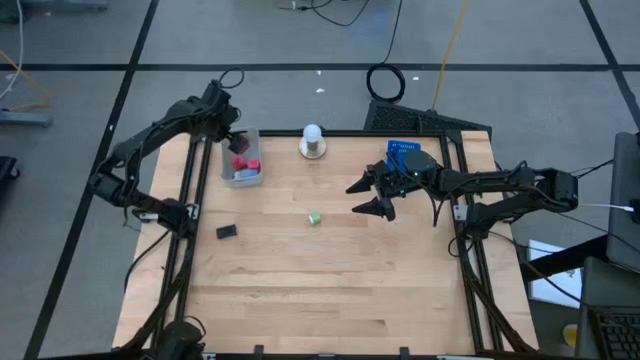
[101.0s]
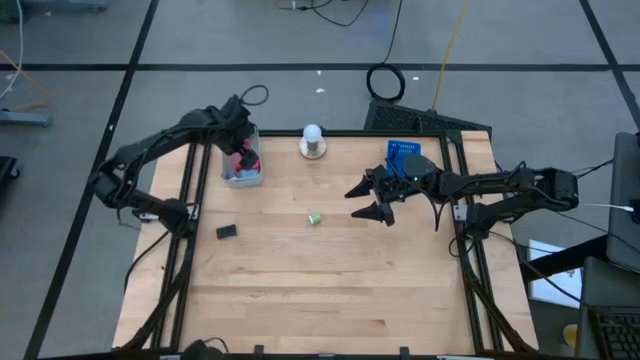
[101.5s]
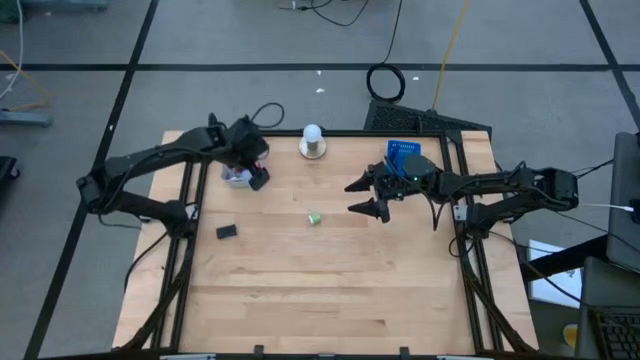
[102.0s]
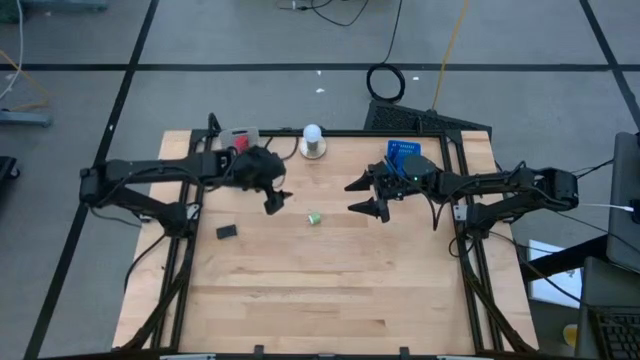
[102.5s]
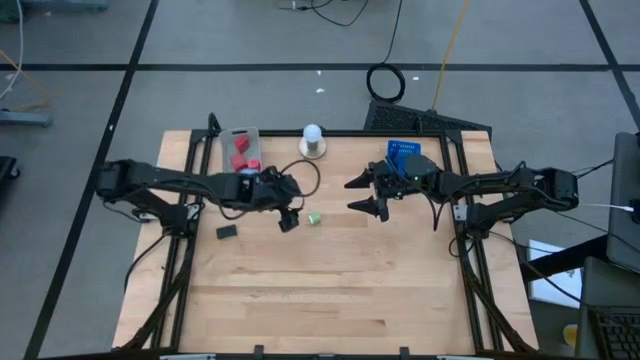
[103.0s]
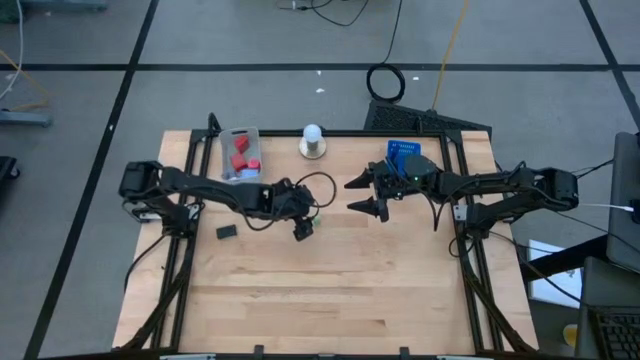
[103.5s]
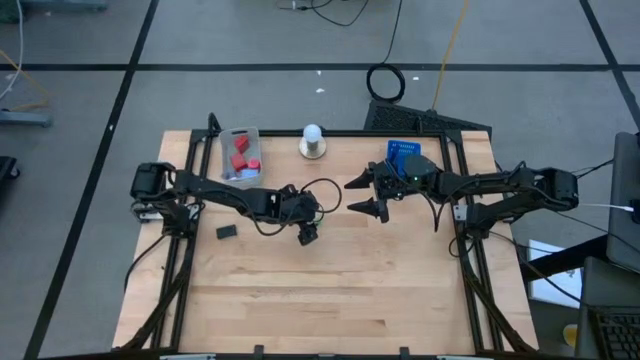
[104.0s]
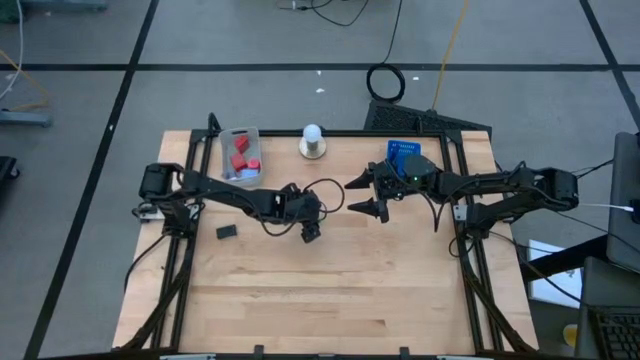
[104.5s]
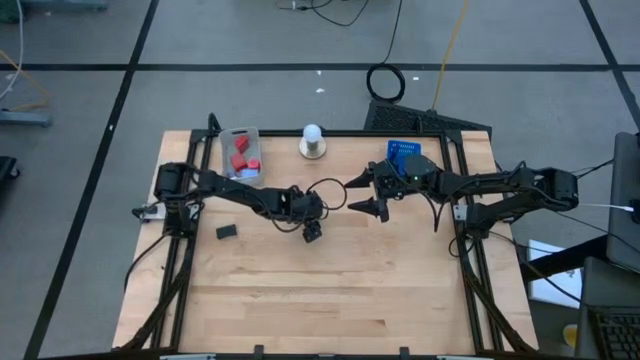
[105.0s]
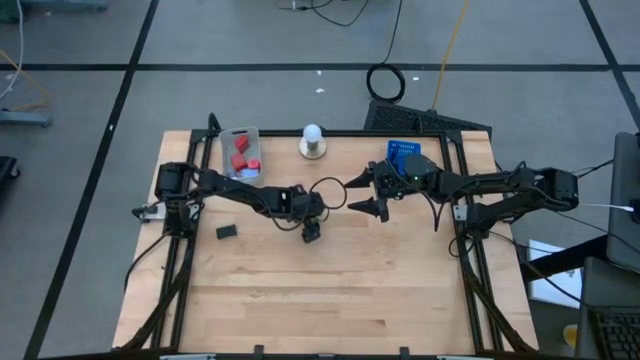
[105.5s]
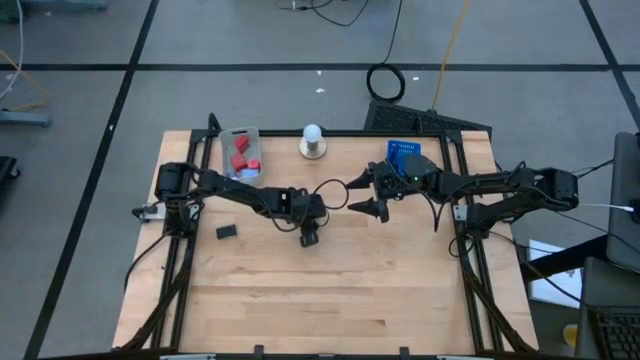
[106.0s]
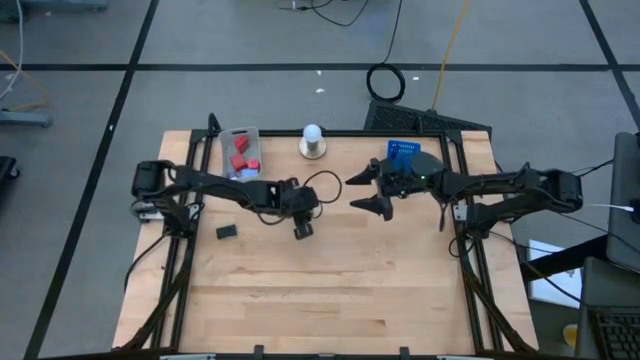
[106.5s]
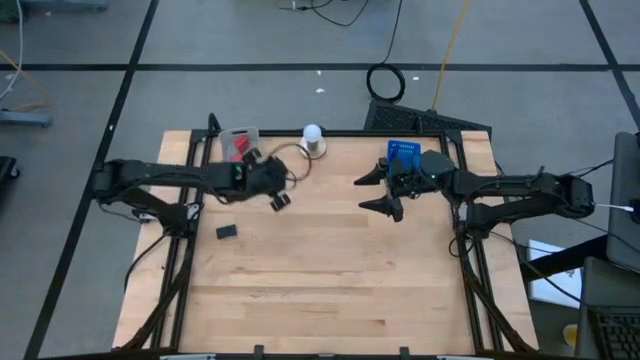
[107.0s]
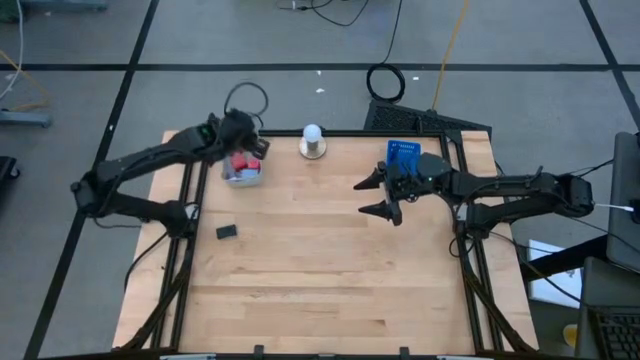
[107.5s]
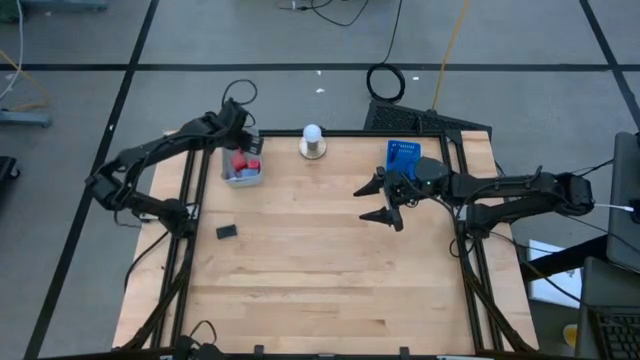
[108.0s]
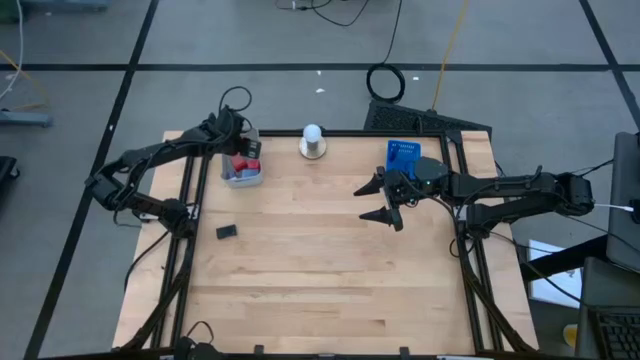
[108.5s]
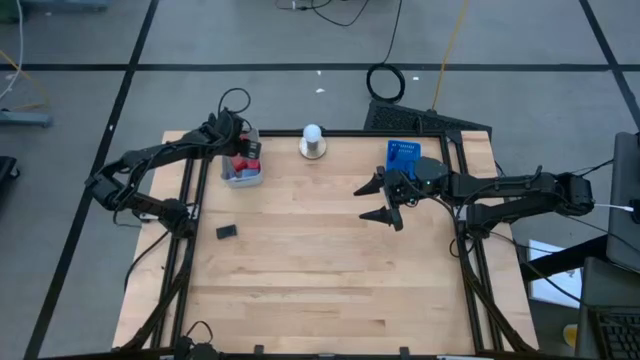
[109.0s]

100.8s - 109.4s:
Task: Pick & Place Office items
Put the green charger adapter into the gray bin

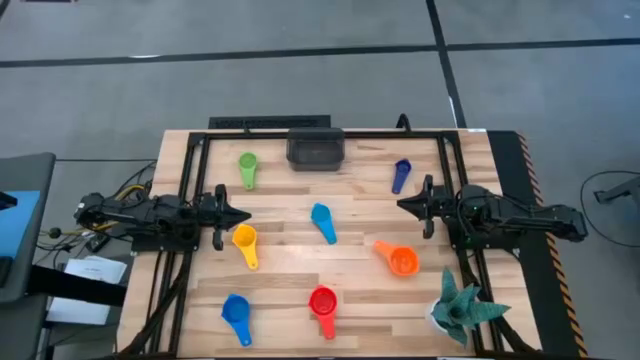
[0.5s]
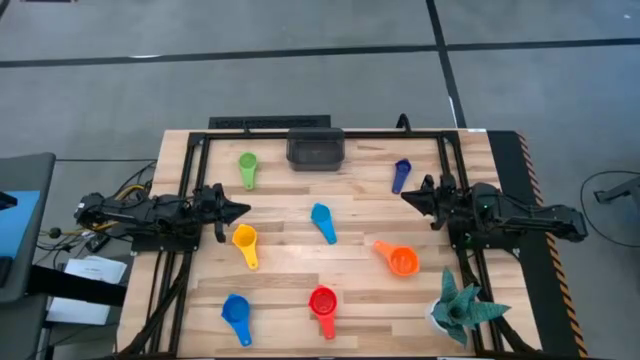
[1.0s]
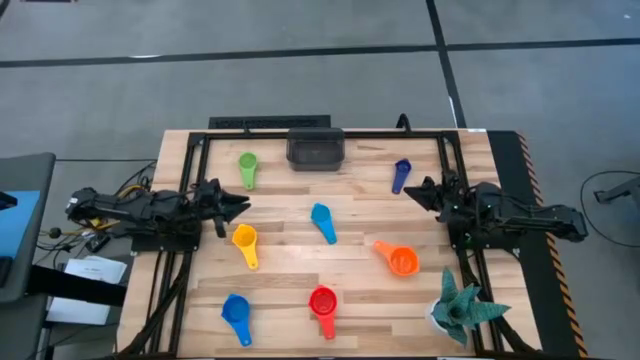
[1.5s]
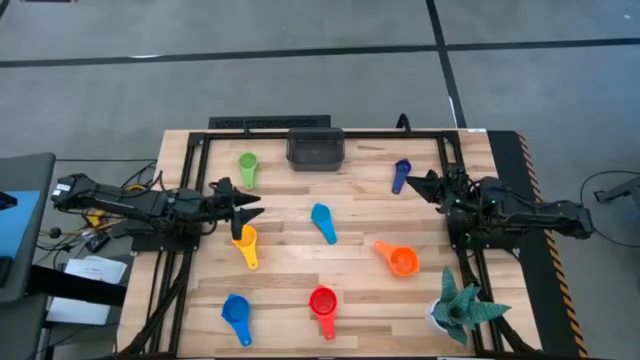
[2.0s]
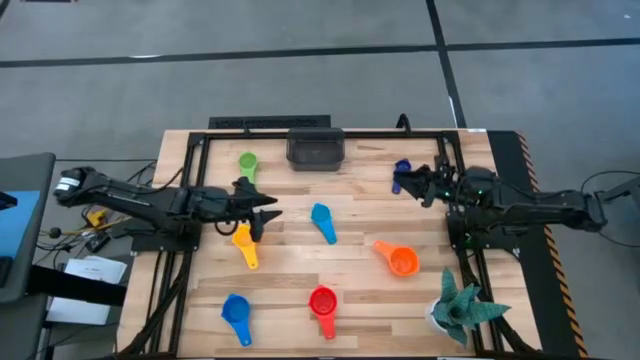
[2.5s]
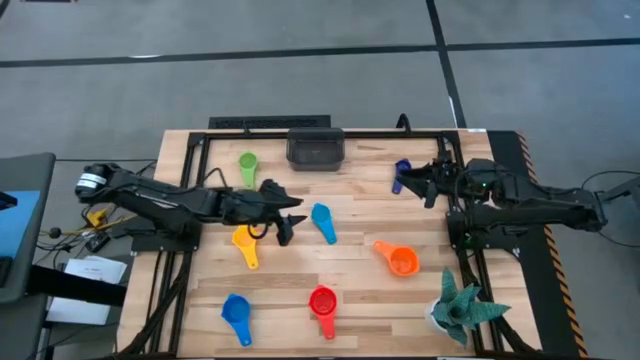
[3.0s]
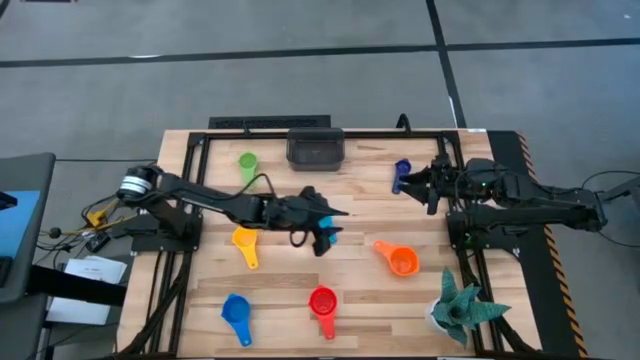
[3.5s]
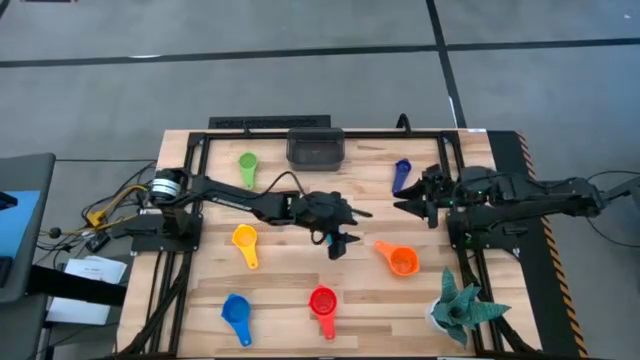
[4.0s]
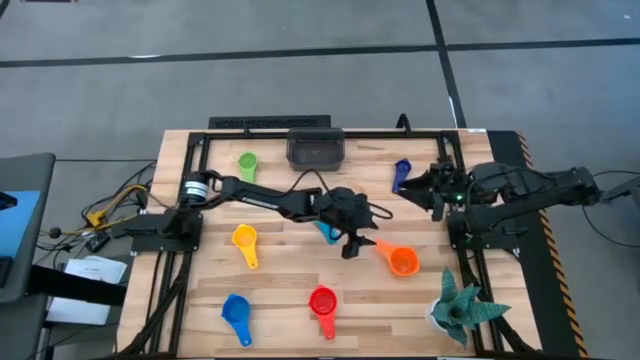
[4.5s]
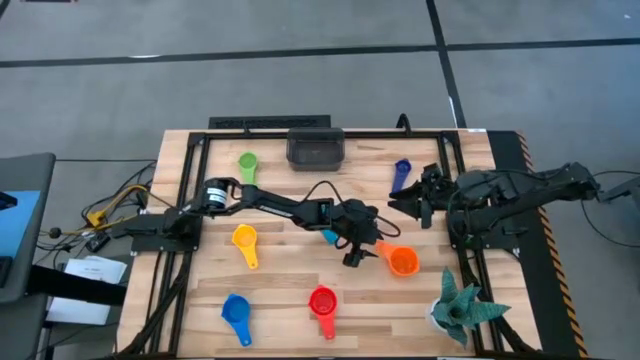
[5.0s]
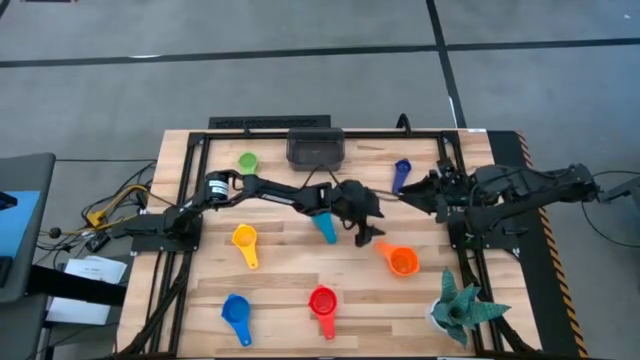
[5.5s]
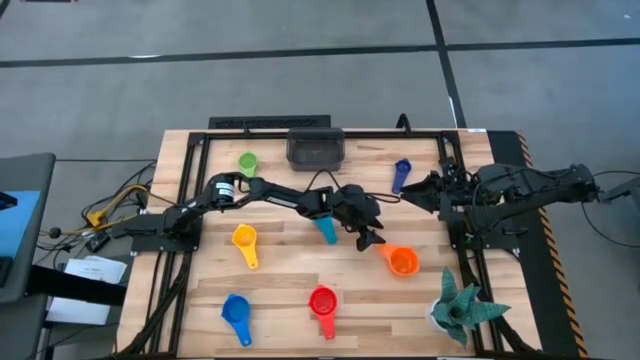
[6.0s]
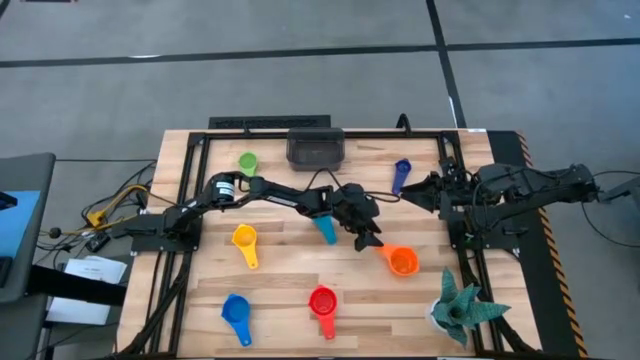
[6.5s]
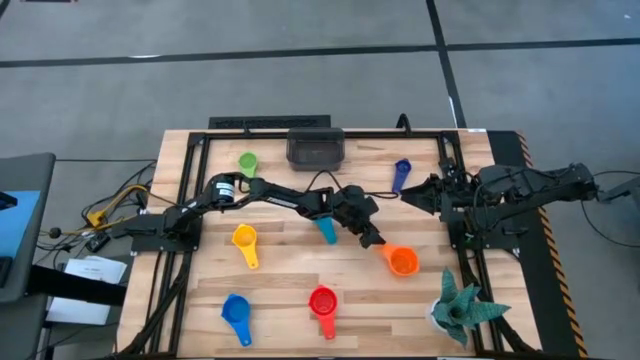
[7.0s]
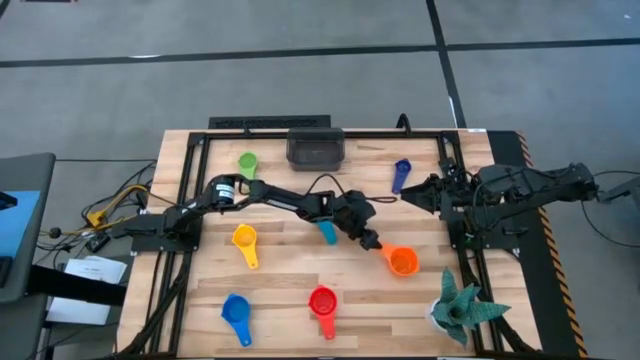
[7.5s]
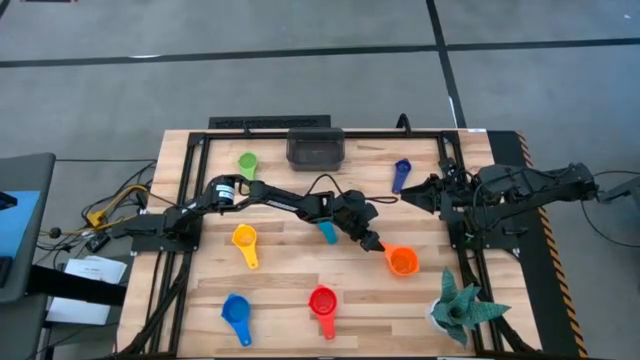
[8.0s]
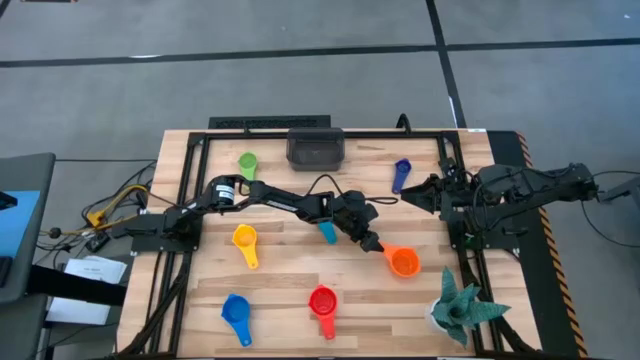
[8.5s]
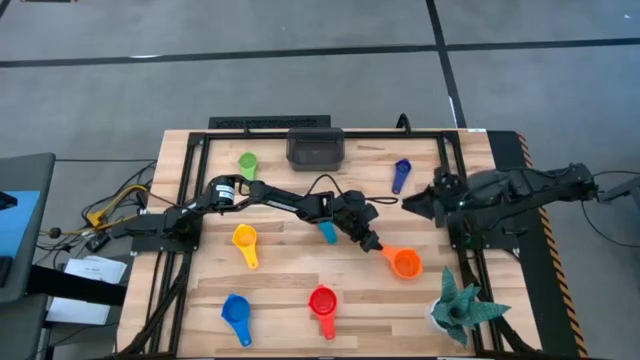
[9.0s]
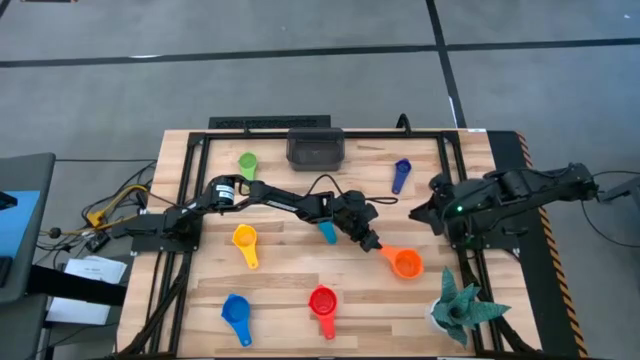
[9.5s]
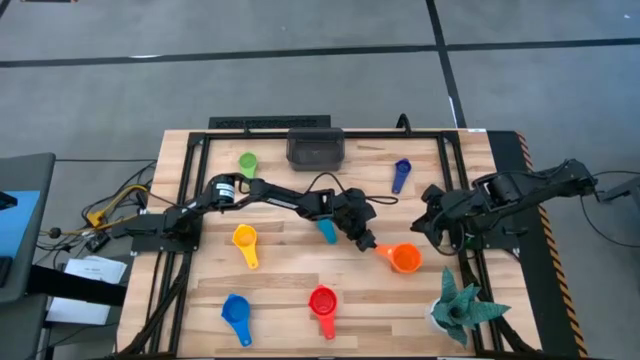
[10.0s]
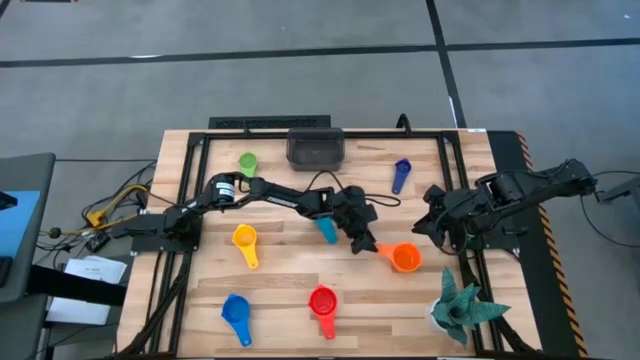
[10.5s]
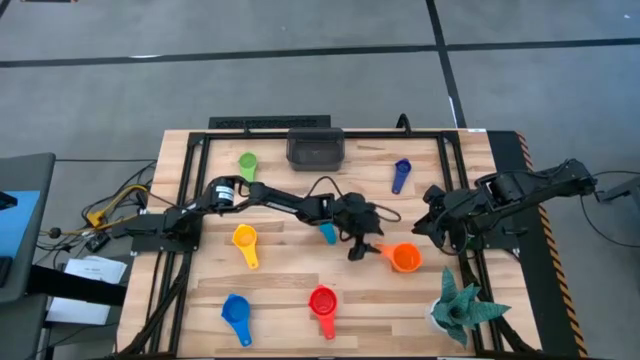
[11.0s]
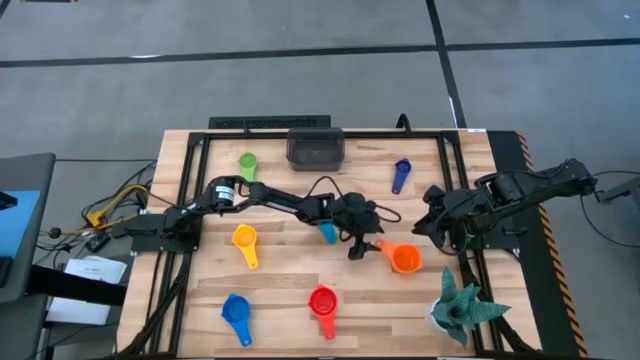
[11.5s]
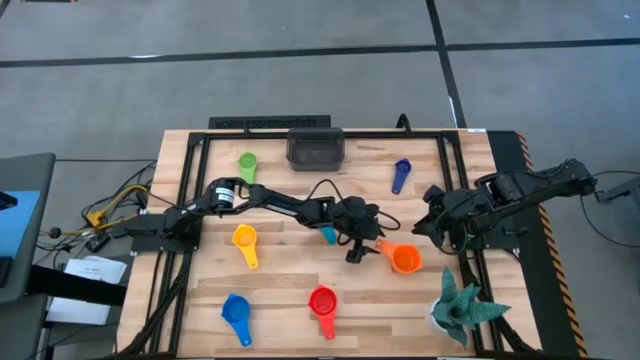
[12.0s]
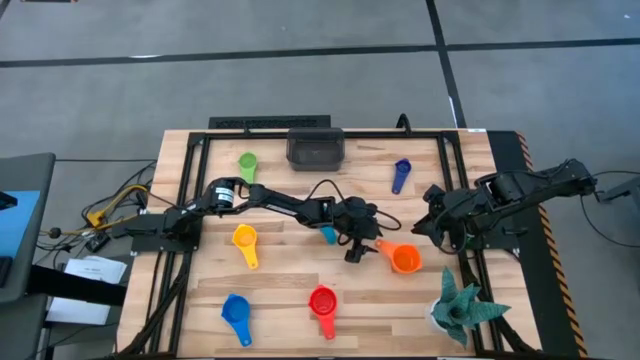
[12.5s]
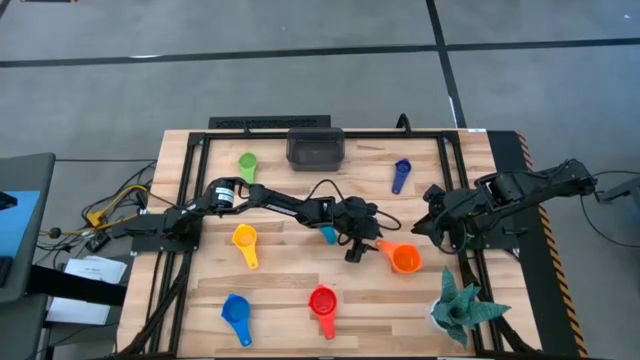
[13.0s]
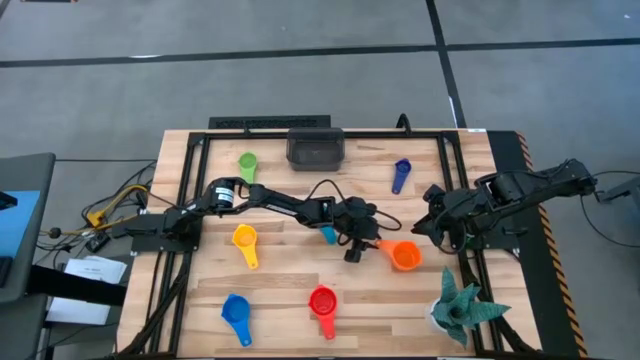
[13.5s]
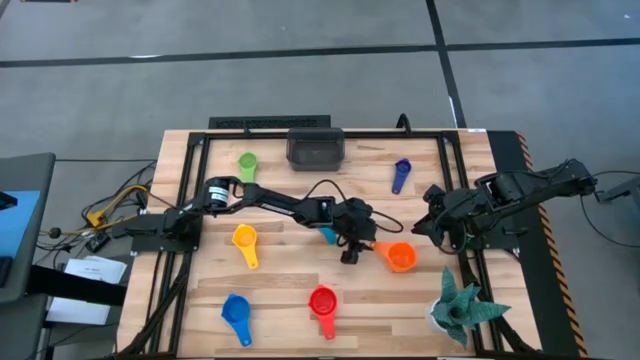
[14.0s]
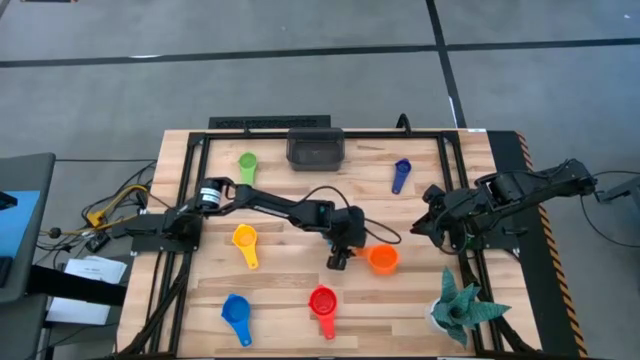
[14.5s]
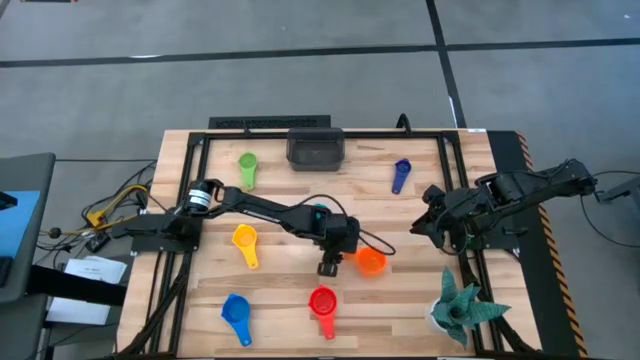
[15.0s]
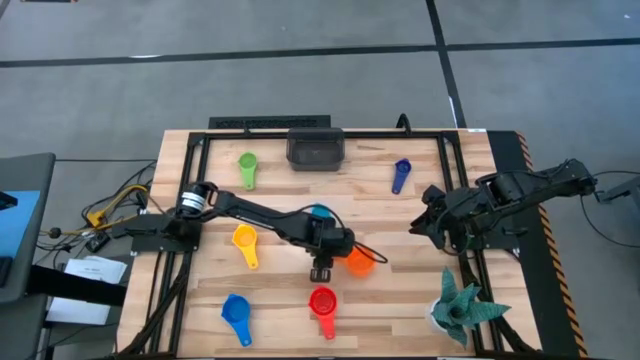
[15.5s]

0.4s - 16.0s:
Task: Nest measuring cups in basket
Move the orange measuring cup to the center of the table
